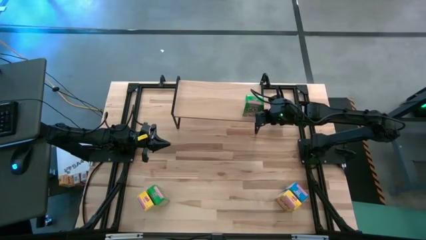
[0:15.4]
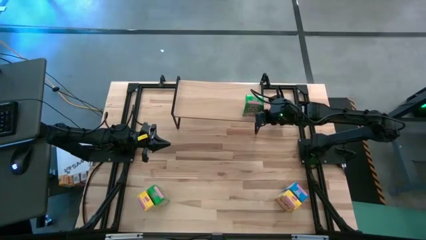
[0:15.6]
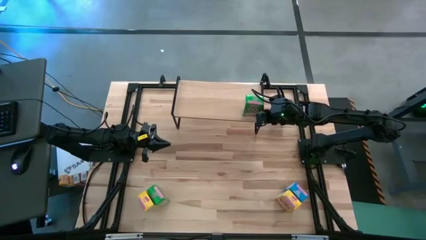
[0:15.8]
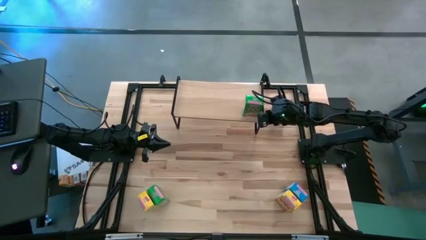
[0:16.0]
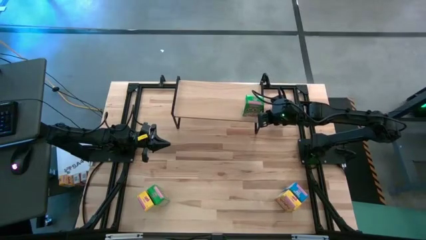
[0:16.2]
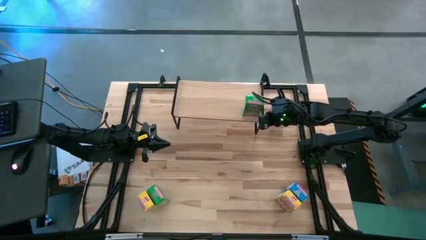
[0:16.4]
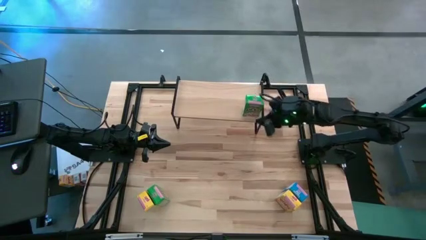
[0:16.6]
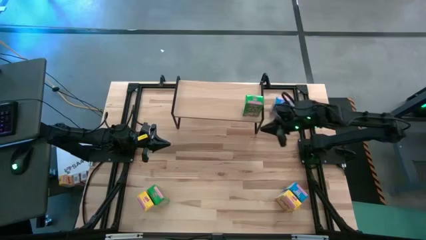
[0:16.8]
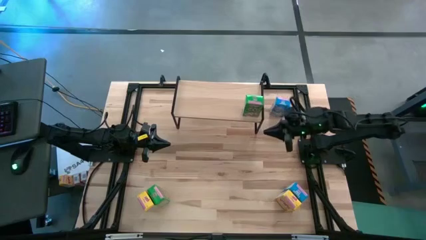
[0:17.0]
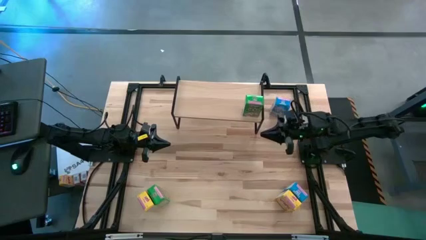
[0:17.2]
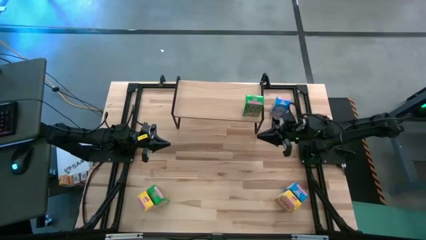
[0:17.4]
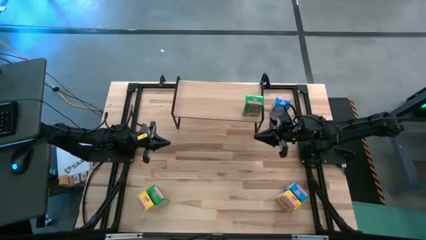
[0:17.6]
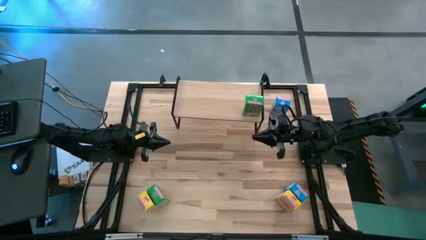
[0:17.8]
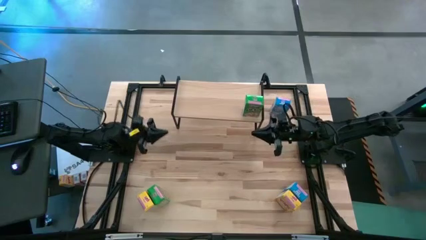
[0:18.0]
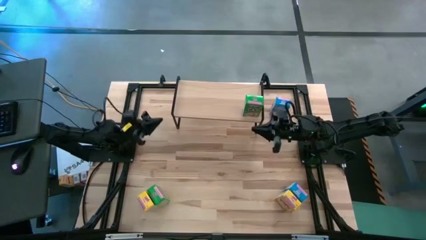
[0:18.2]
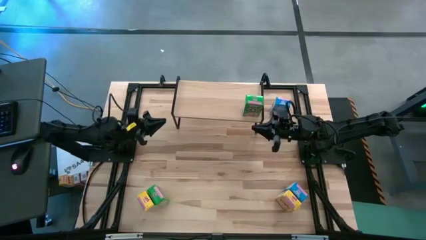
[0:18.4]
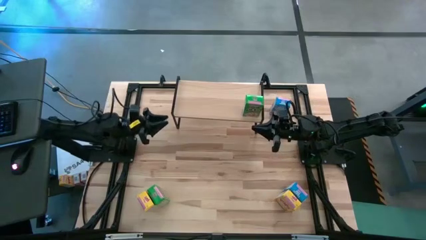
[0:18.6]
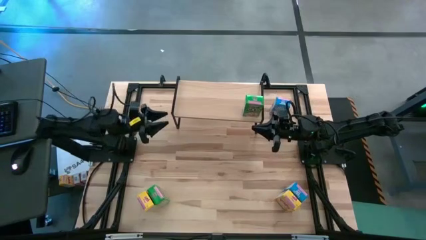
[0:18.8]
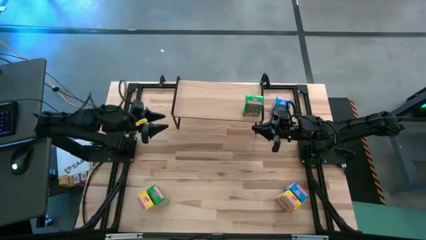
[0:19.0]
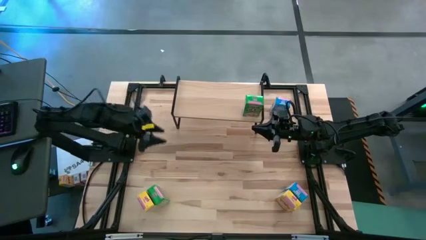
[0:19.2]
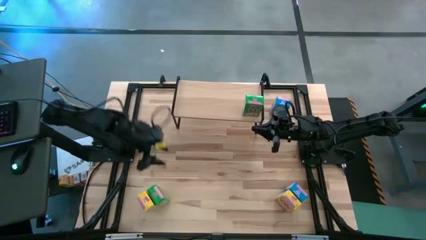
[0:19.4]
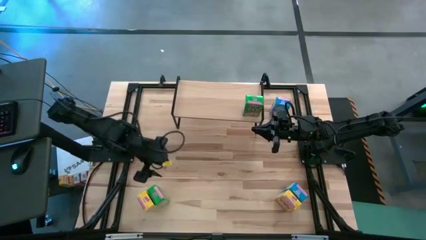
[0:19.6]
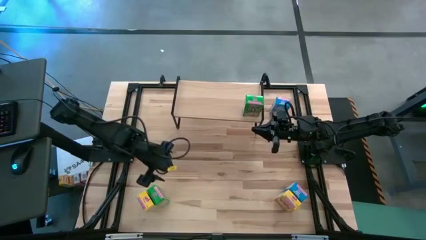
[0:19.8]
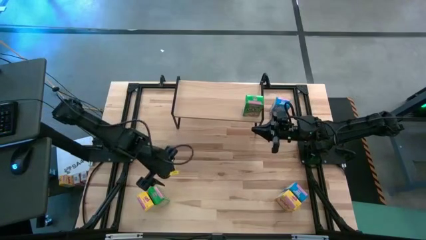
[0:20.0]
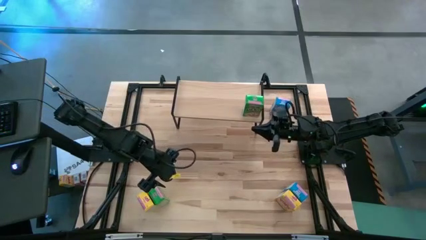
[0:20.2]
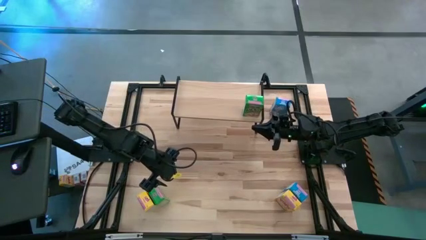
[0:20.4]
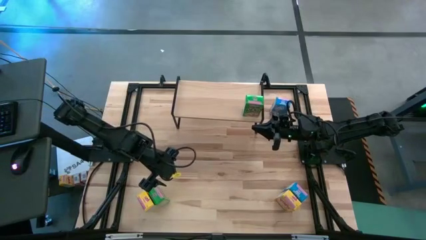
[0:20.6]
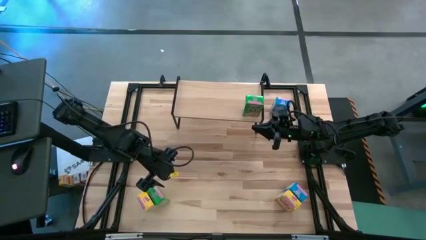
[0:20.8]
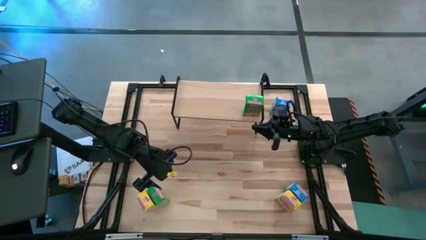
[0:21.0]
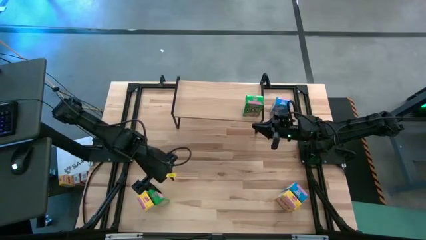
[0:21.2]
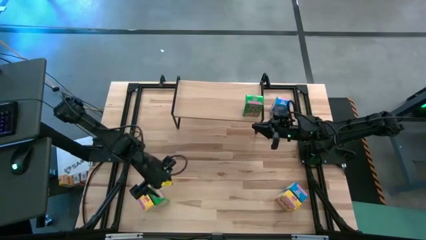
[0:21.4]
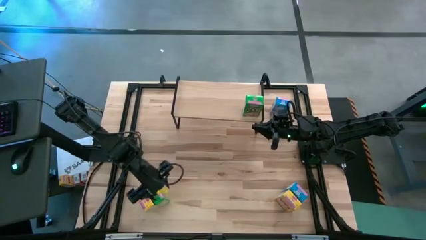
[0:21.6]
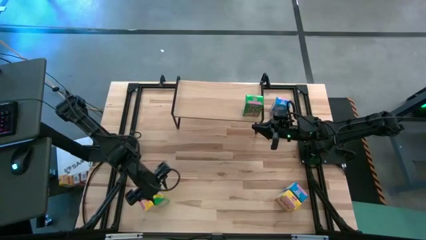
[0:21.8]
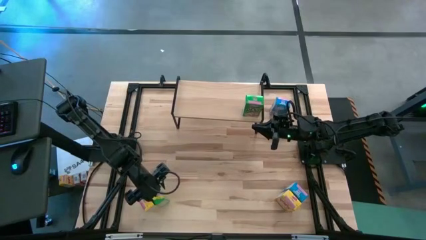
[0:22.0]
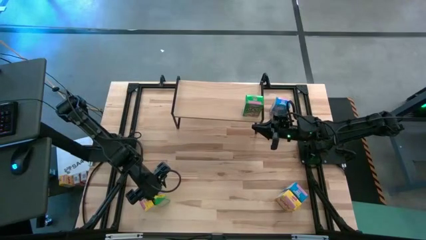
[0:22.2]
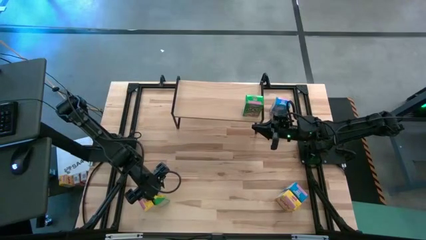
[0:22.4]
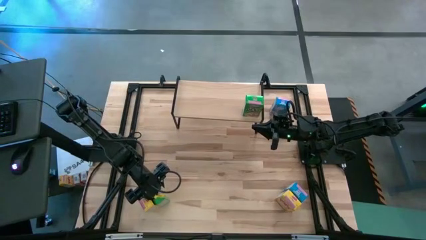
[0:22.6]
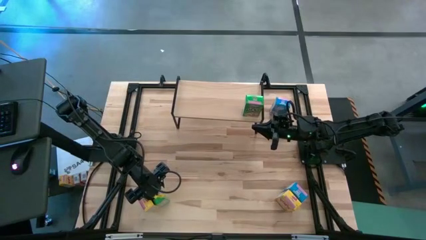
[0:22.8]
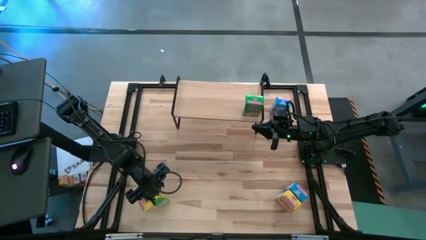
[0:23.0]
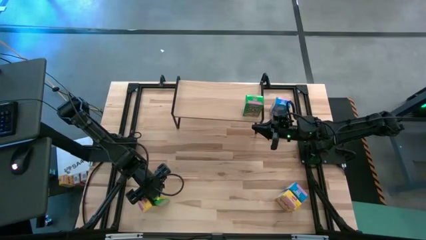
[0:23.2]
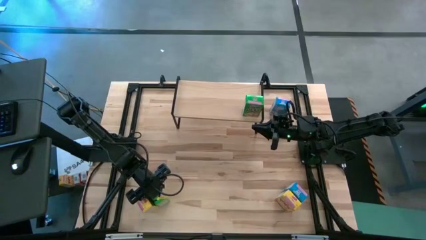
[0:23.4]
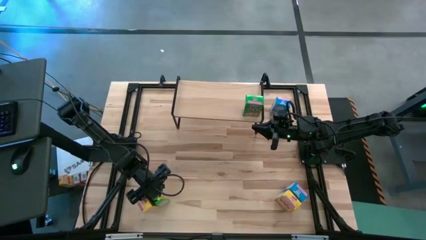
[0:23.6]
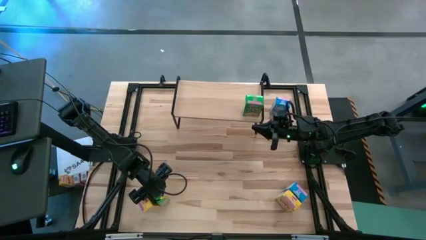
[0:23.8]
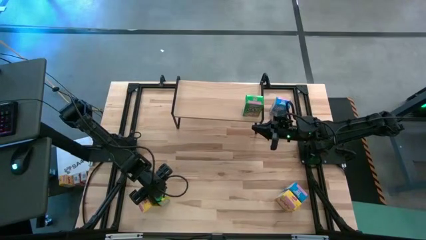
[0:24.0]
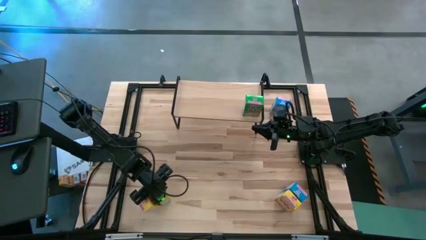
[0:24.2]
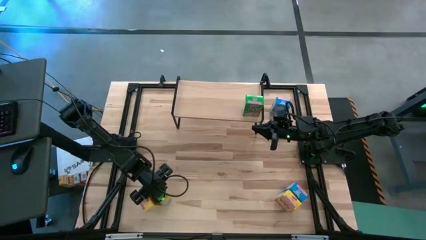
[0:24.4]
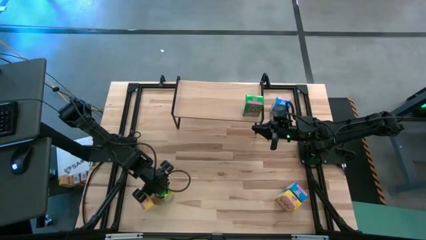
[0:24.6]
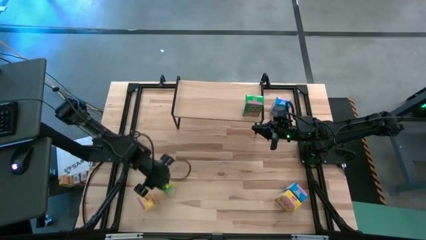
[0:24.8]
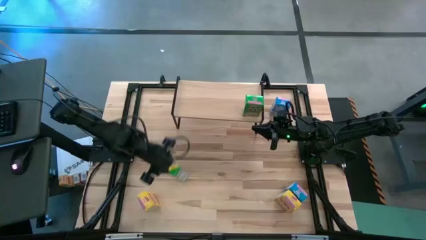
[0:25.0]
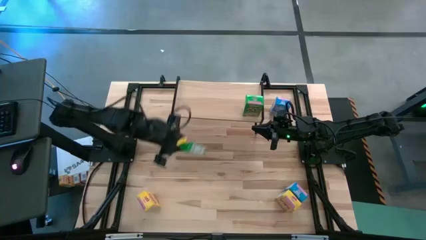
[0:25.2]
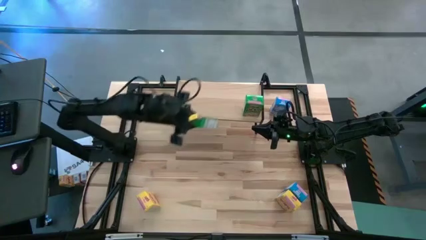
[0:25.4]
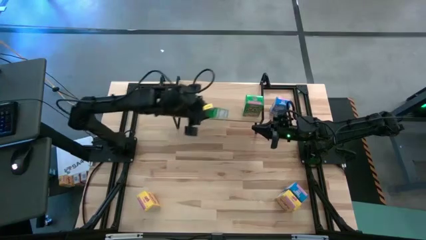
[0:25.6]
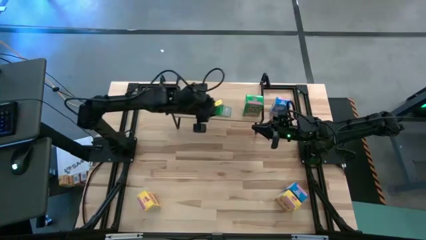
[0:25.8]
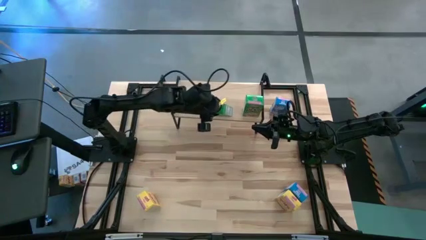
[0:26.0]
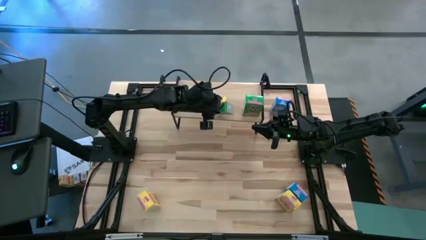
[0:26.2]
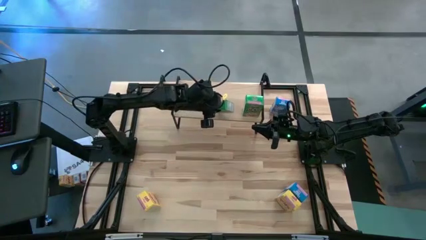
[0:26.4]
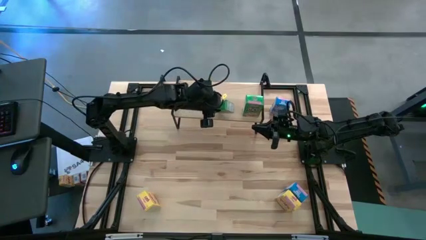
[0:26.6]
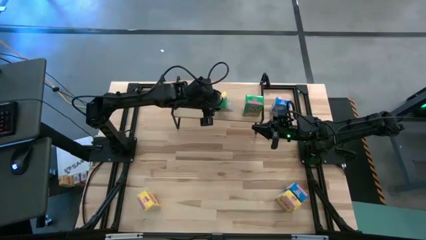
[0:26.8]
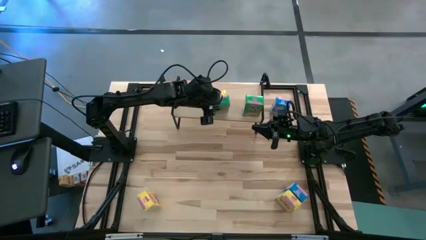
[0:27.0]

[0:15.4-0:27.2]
Task: Stack cereal on shelf
Put the green cereal box on the shelf aligned with the other green cereal box
